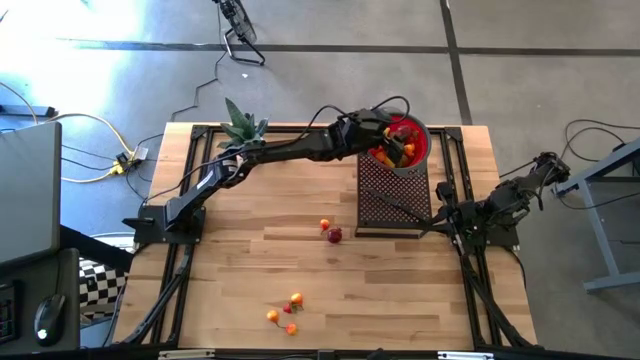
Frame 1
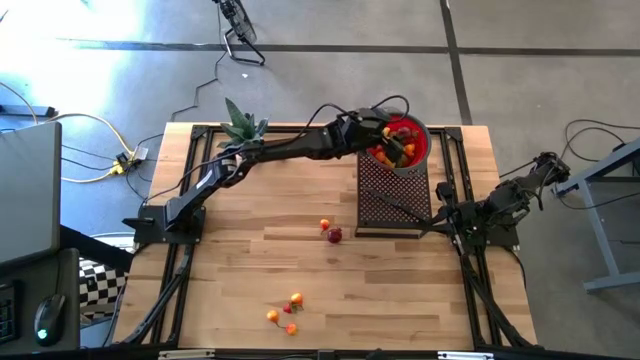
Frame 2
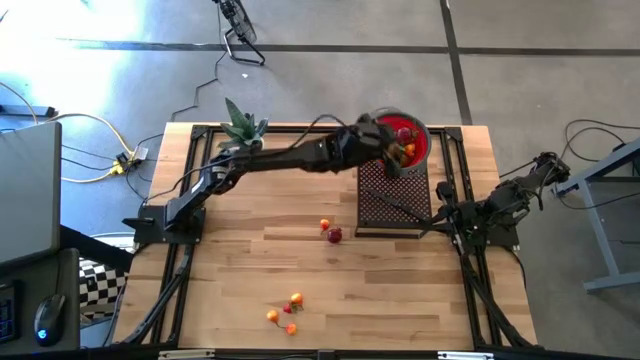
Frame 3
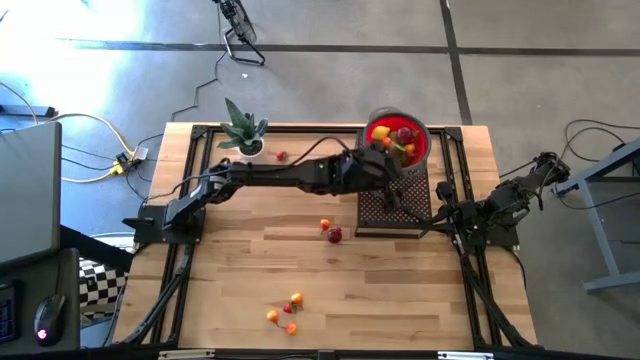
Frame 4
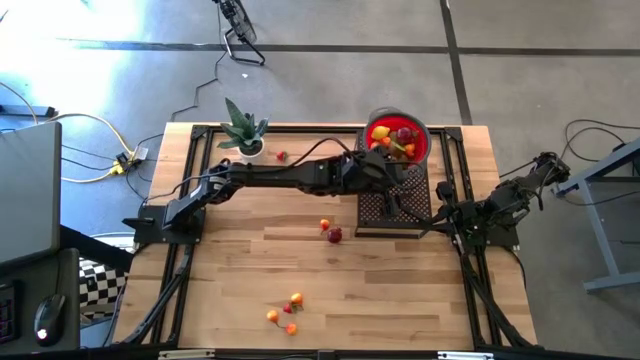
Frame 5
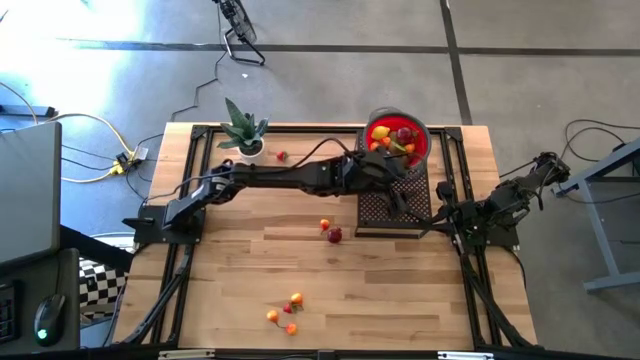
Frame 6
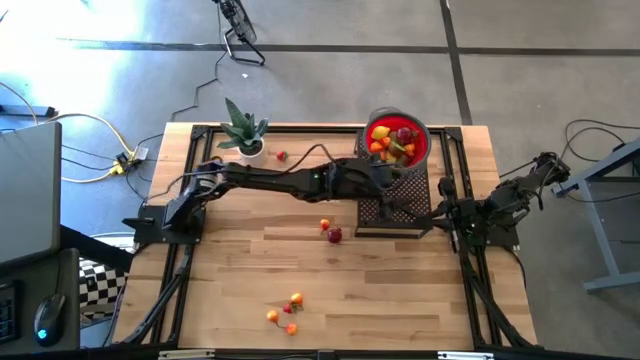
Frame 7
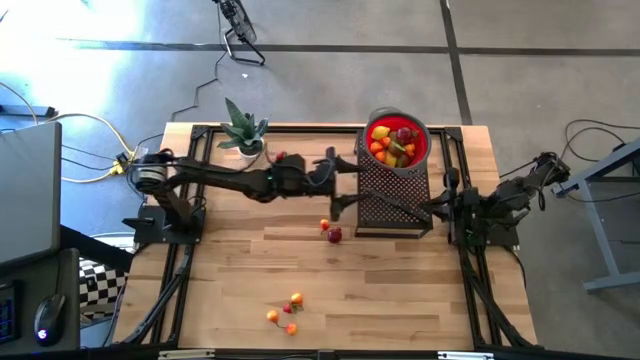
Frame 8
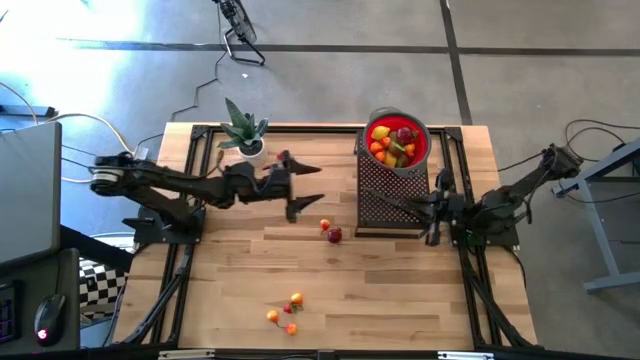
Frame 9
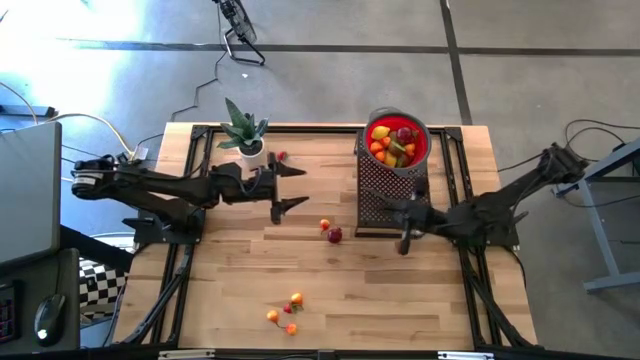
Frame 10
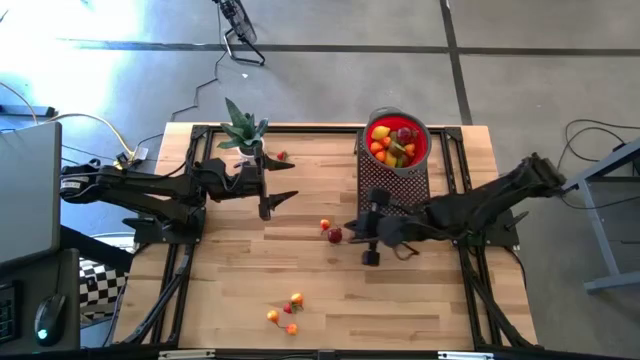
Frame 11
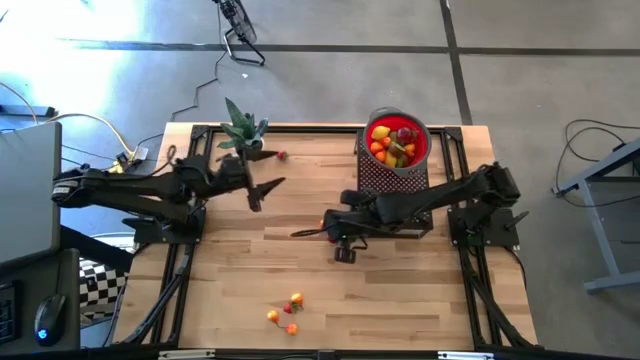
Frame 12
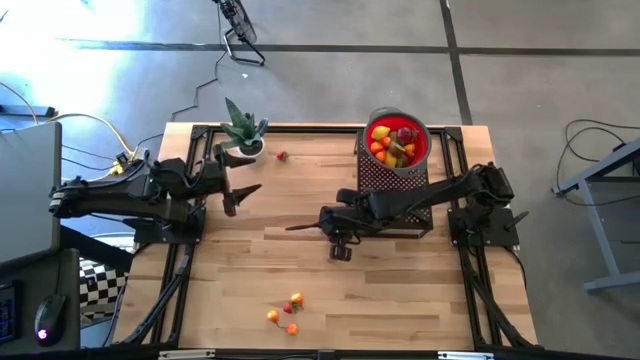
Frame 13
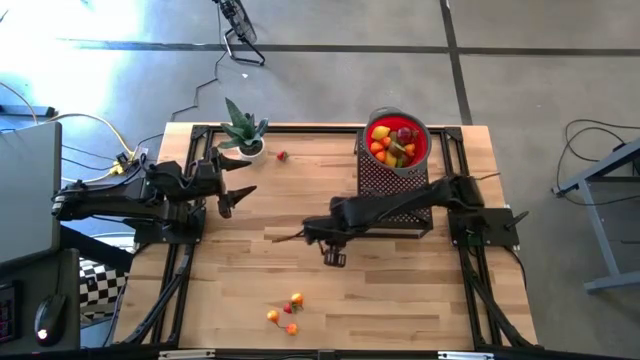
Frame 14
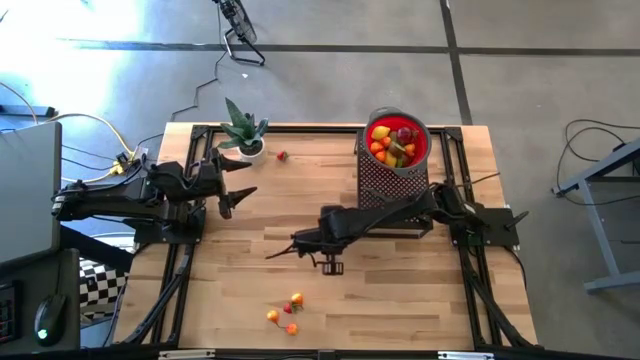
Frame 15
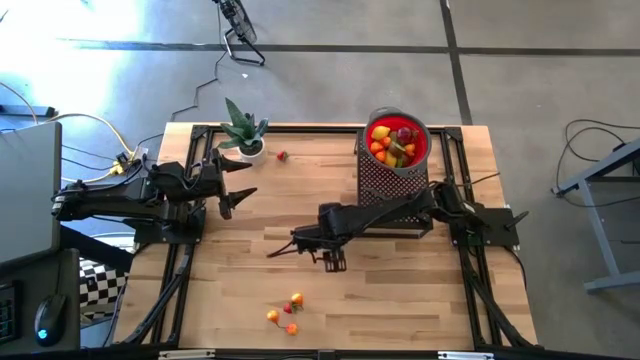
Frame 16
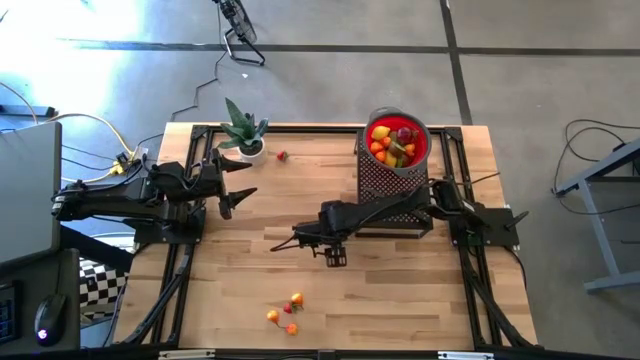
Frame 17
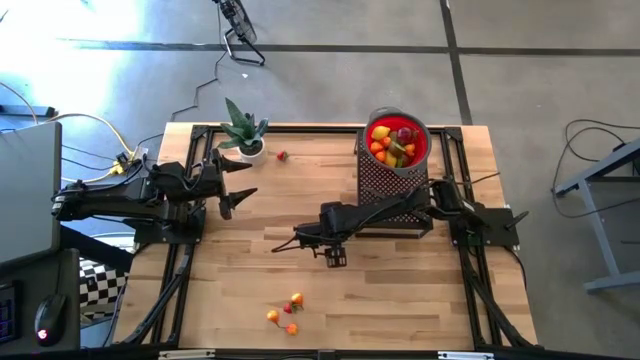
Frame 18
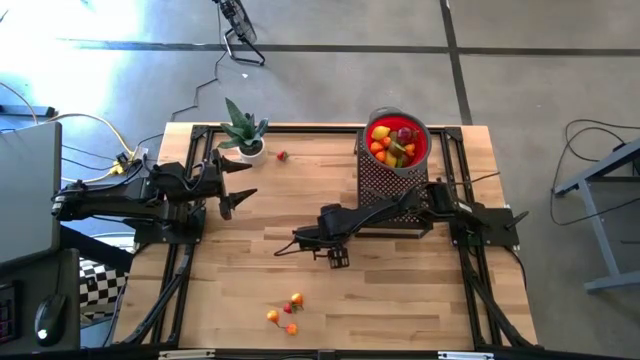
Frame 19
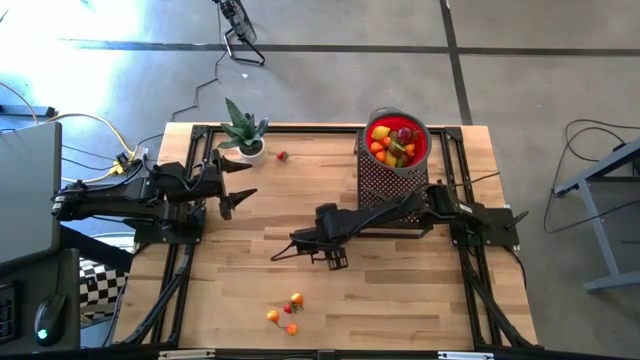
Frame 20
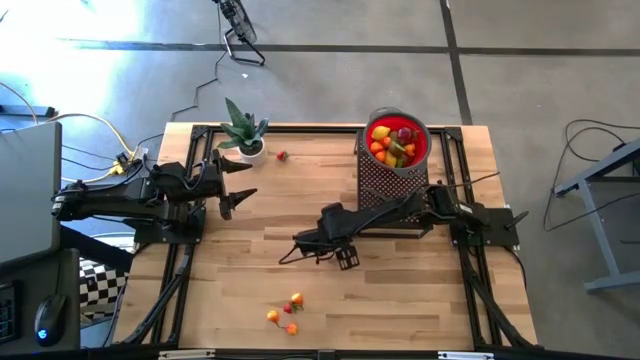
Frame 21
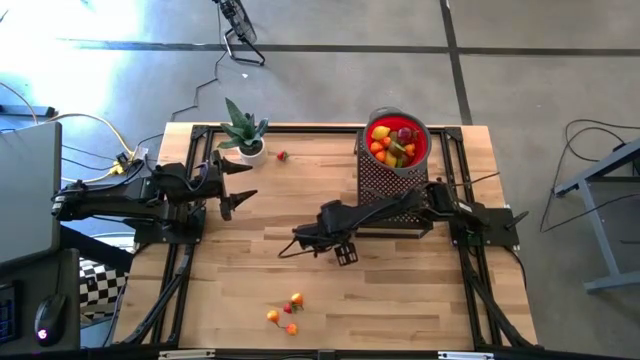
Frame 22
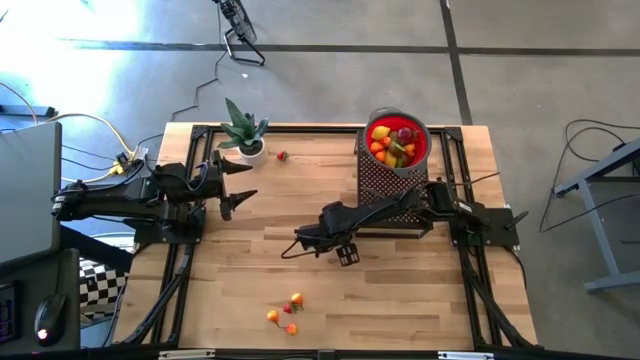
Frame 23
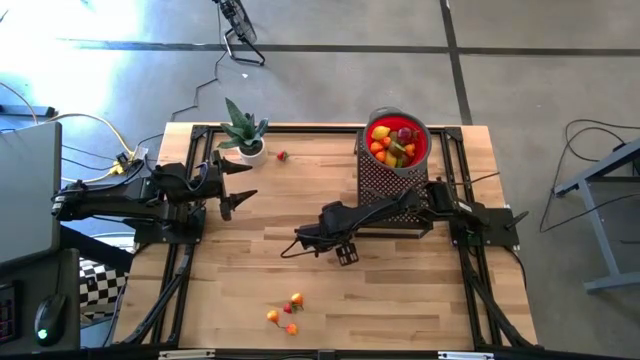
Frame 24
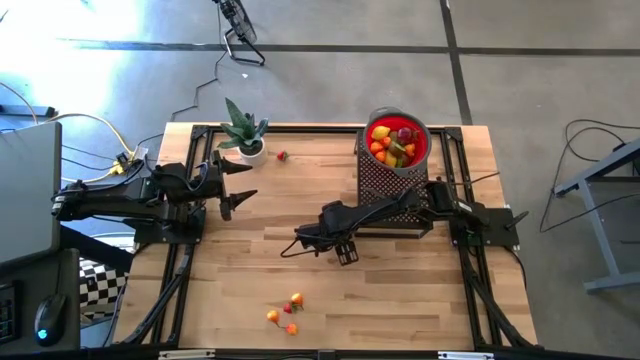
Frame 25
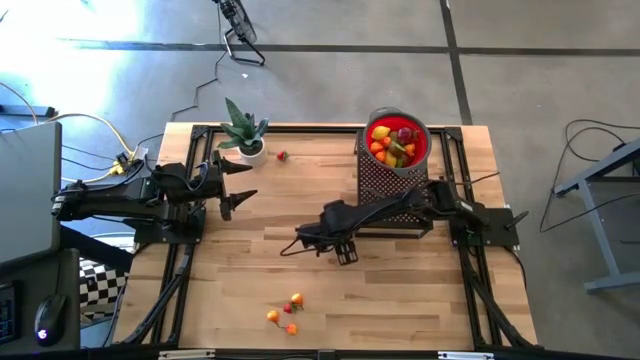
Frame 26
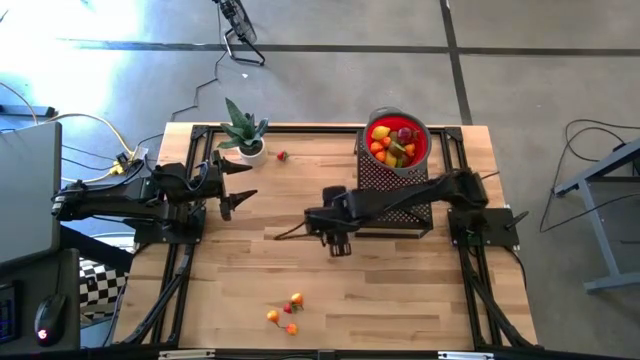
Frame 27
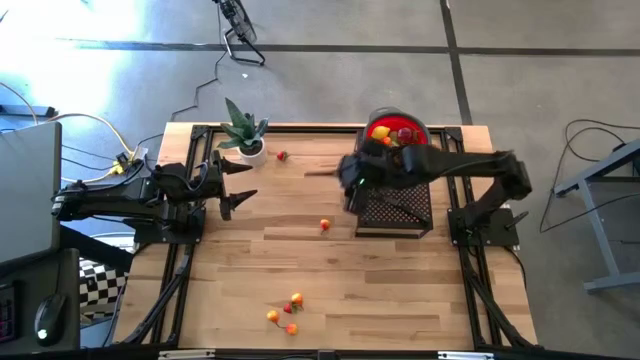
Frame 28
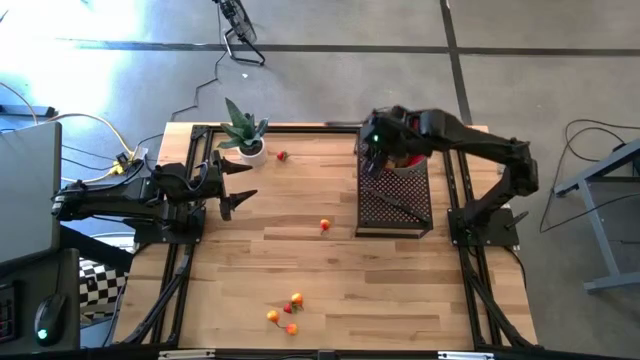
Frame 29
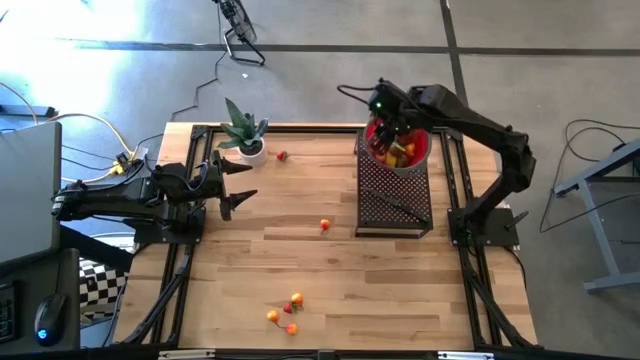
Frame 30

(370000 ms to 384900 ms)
Task: Pick & Place Fruit
Put the pomegranate into the strainer bowl on the shelf

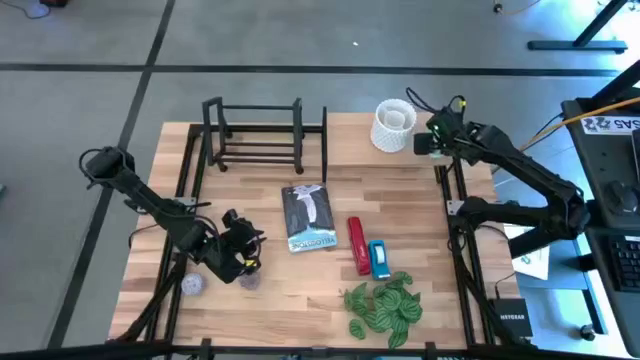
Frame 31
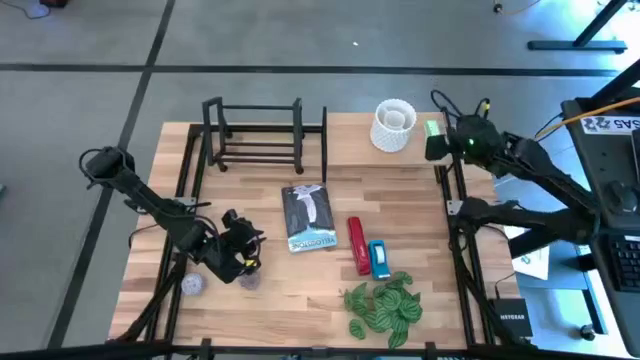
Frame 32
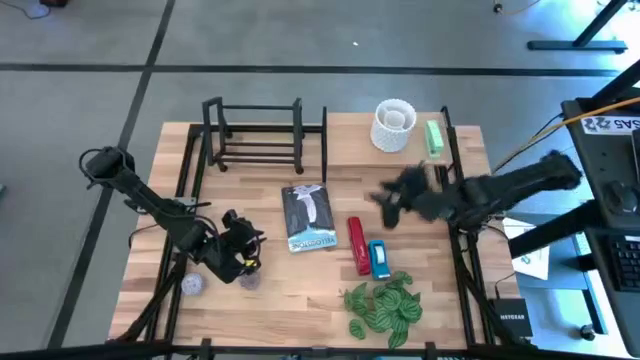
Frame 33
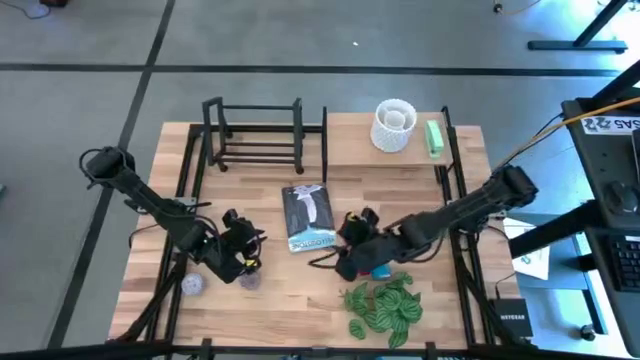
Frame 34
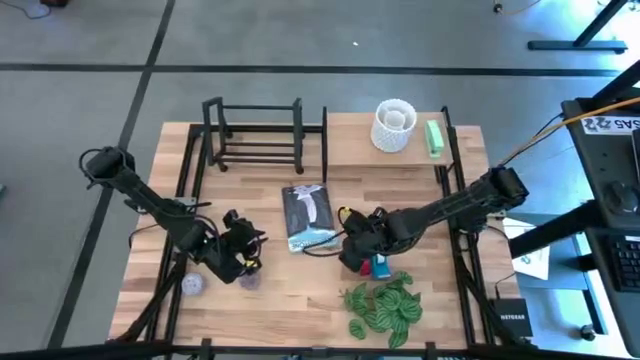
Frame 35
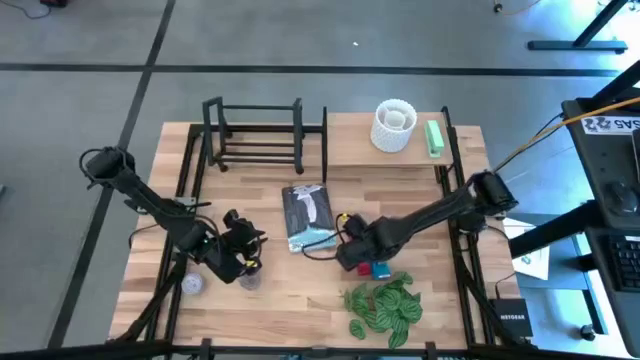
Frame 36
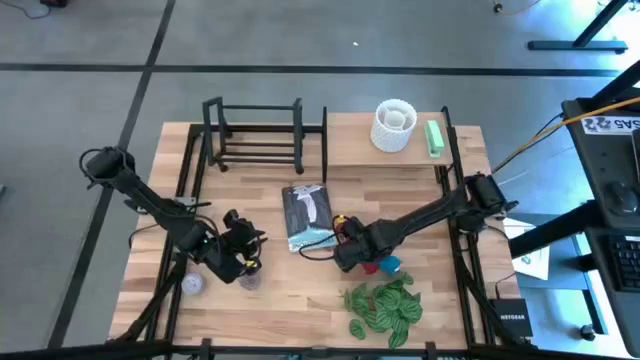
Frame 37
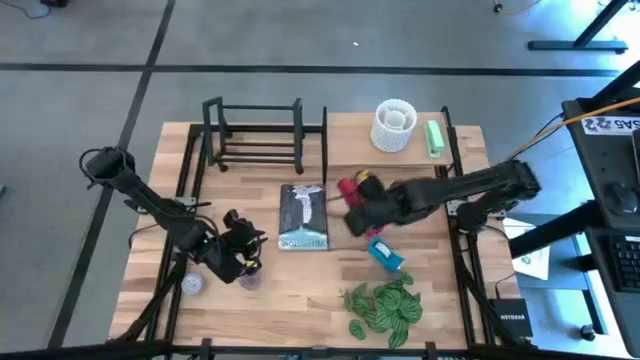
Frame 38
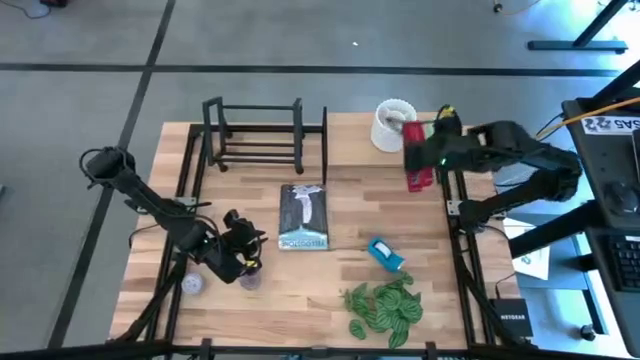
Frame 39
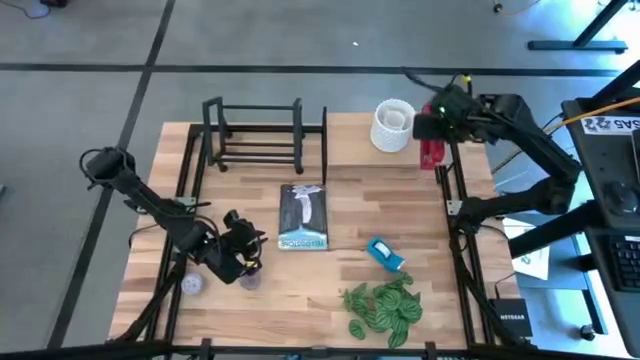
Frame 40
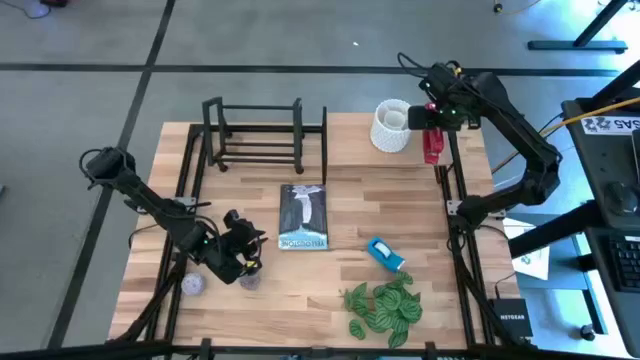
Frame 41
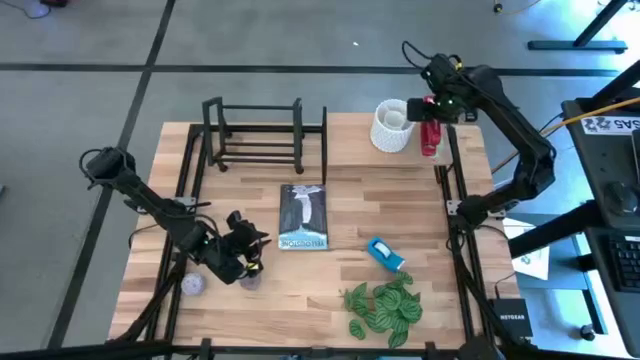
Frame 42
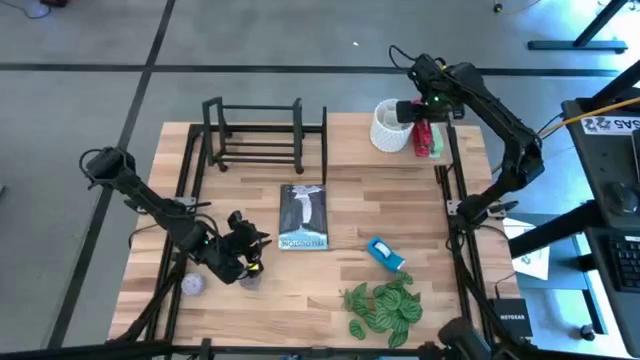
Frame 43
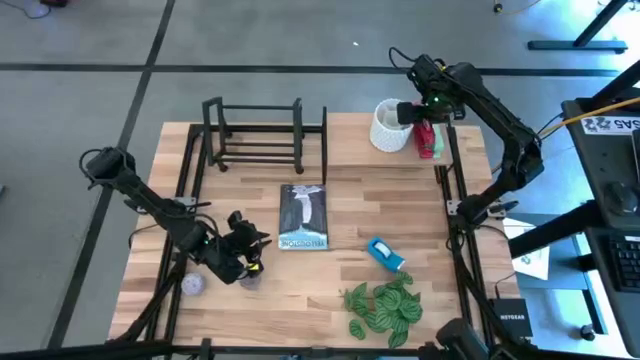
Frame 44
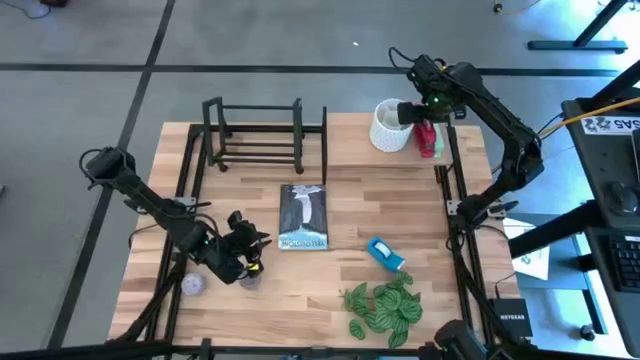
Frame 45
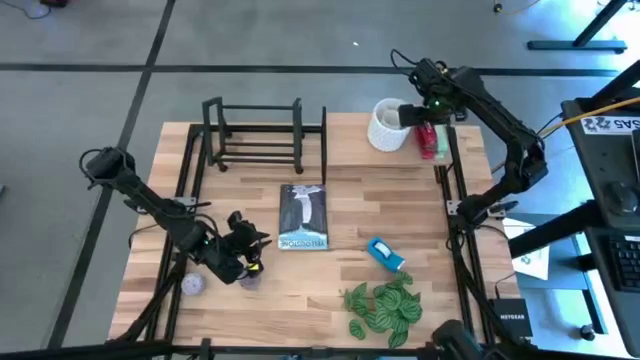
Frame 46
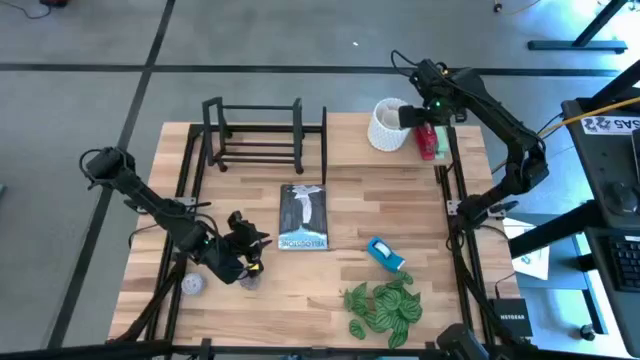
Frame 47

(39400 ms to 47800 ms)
Task: Stock shelves
Put the red stapler on the shelf
